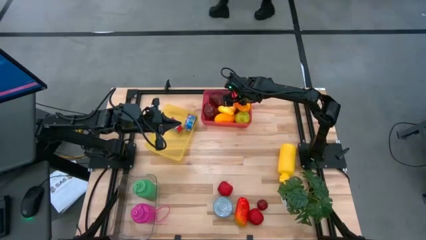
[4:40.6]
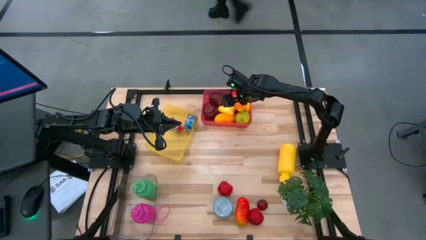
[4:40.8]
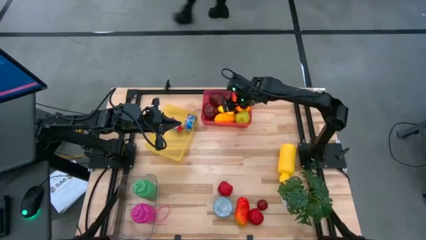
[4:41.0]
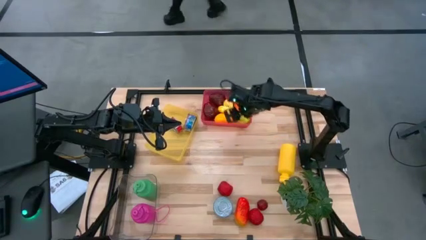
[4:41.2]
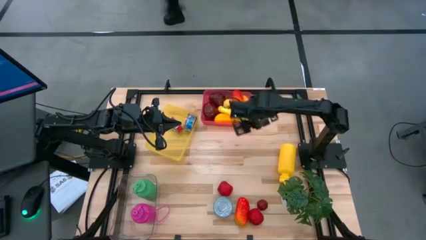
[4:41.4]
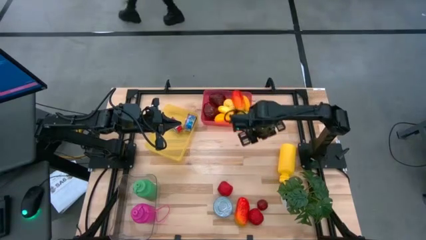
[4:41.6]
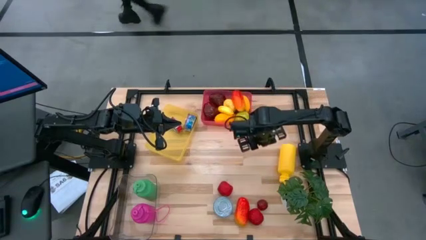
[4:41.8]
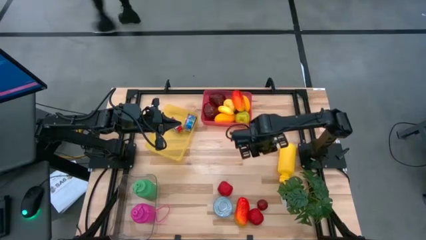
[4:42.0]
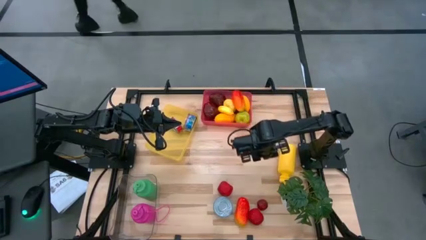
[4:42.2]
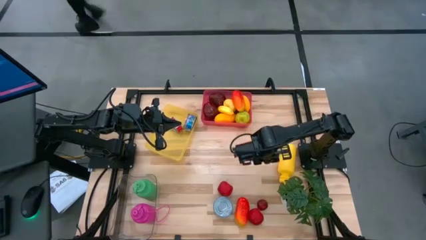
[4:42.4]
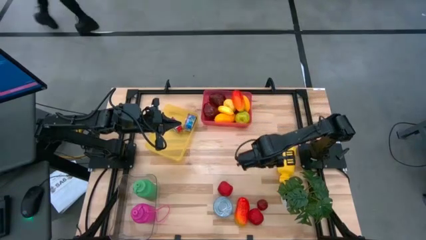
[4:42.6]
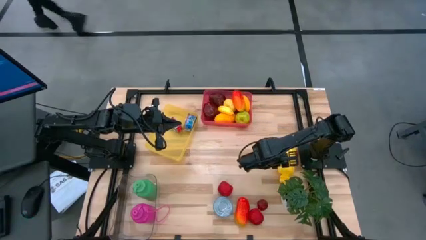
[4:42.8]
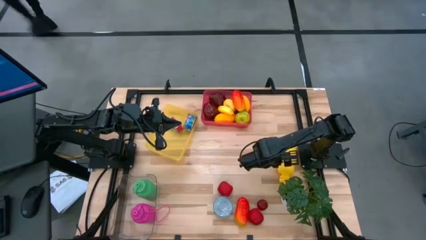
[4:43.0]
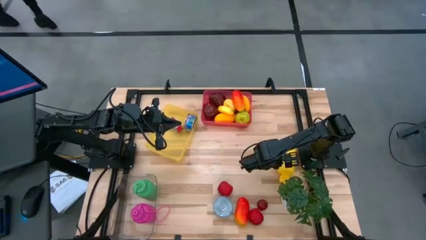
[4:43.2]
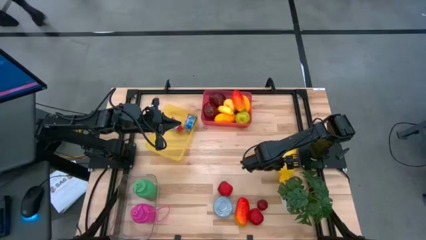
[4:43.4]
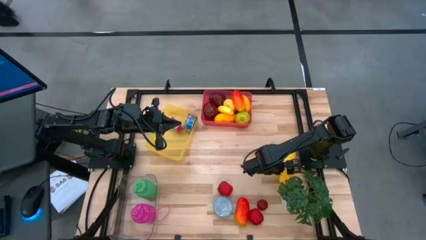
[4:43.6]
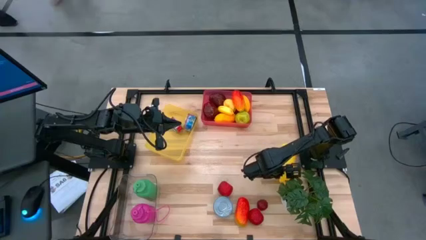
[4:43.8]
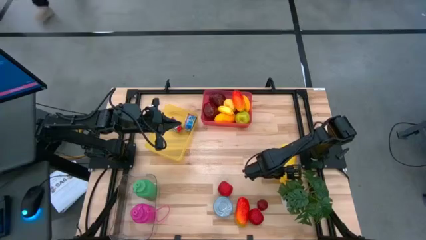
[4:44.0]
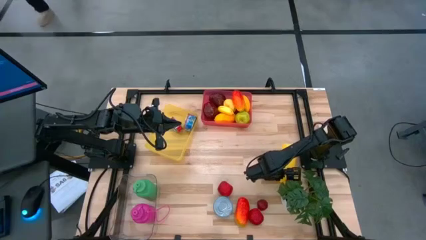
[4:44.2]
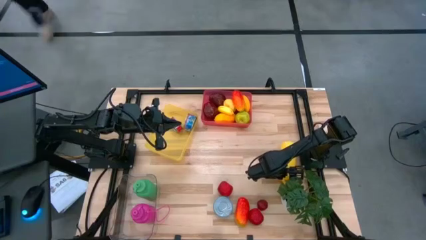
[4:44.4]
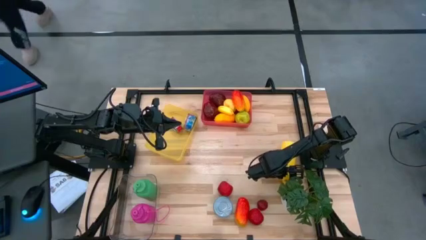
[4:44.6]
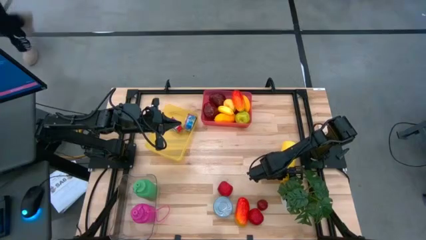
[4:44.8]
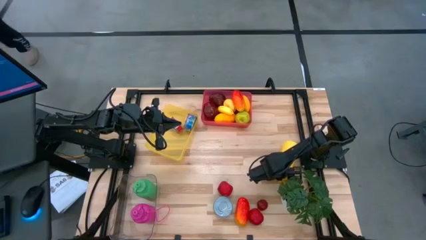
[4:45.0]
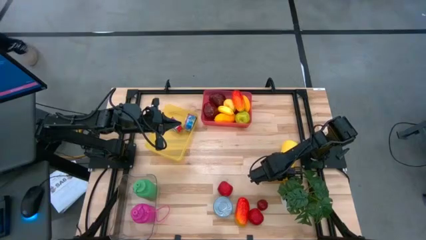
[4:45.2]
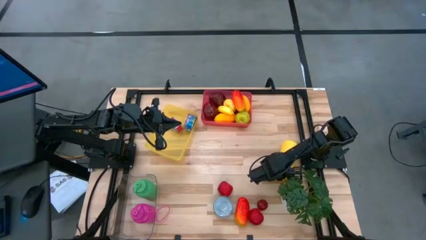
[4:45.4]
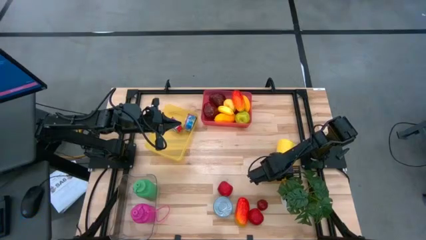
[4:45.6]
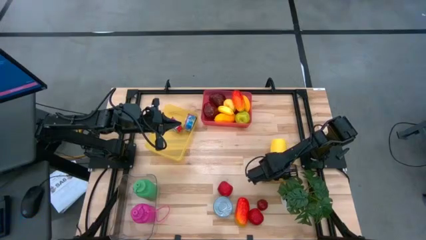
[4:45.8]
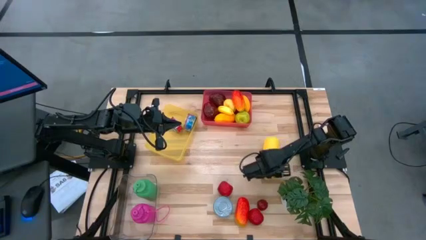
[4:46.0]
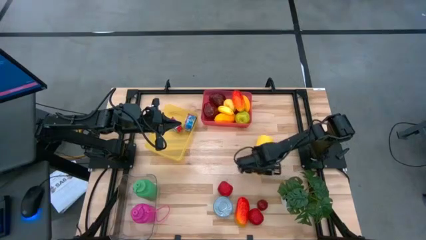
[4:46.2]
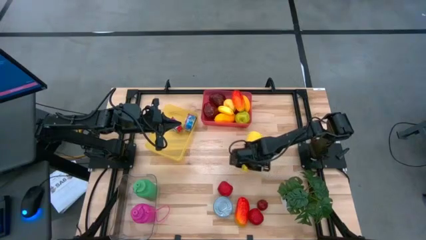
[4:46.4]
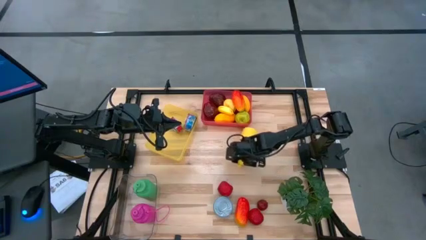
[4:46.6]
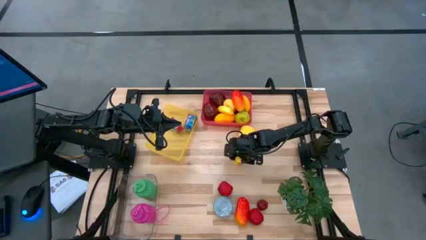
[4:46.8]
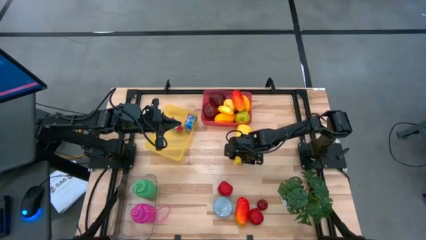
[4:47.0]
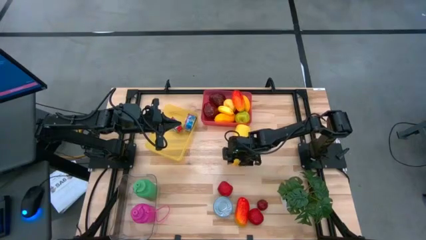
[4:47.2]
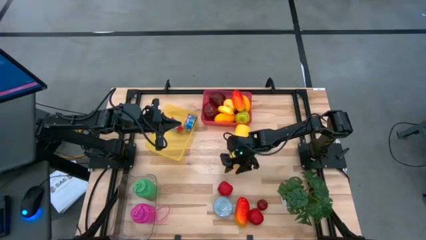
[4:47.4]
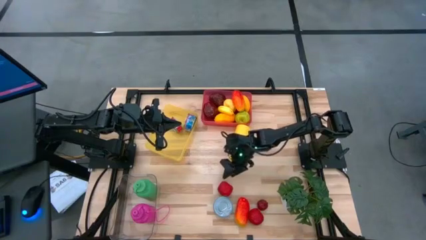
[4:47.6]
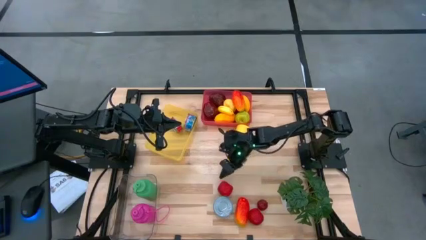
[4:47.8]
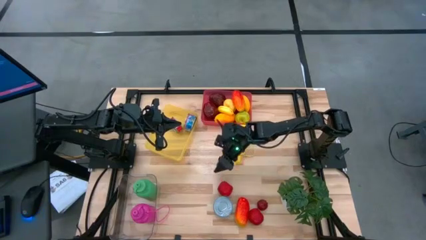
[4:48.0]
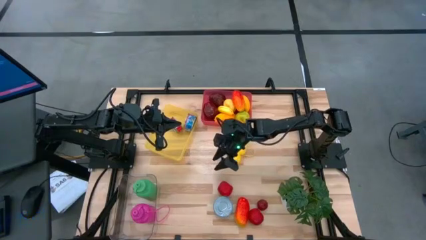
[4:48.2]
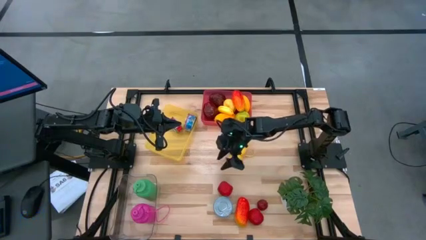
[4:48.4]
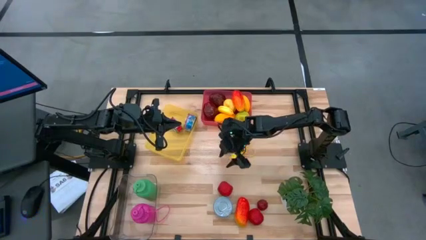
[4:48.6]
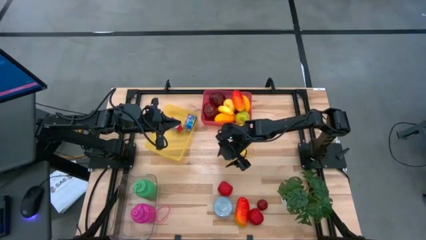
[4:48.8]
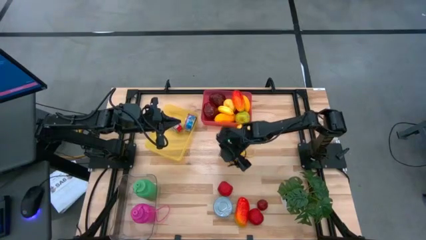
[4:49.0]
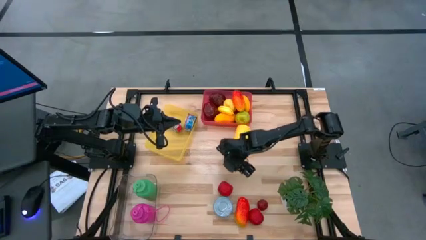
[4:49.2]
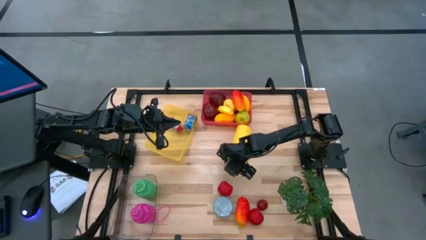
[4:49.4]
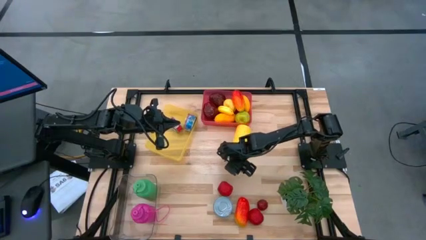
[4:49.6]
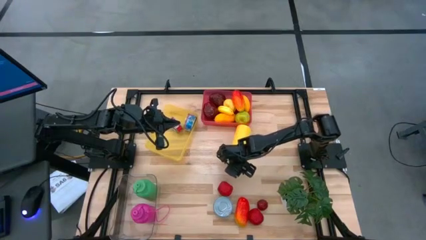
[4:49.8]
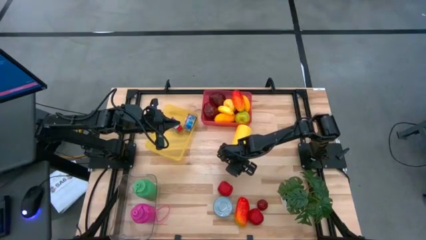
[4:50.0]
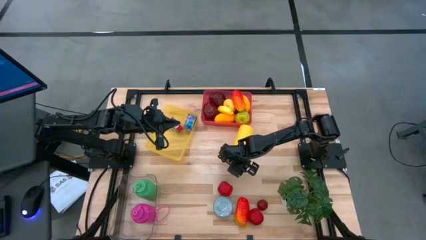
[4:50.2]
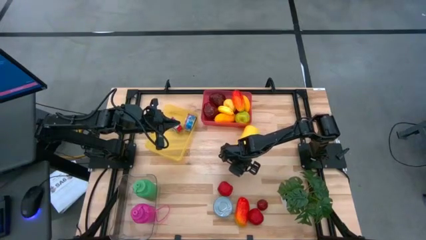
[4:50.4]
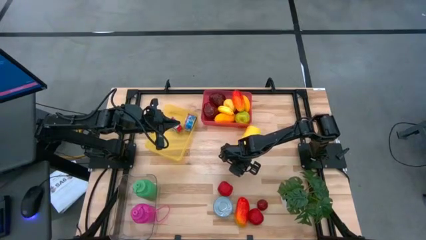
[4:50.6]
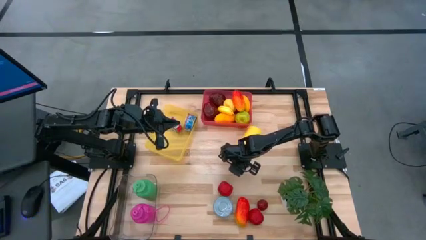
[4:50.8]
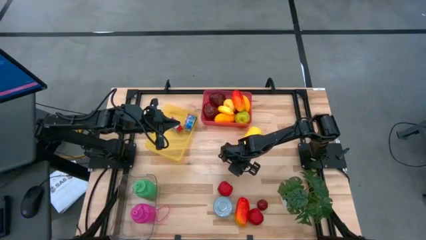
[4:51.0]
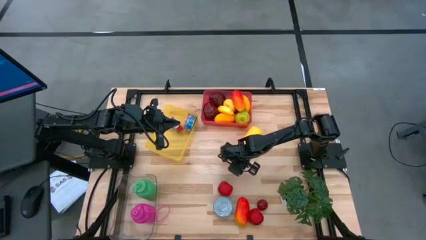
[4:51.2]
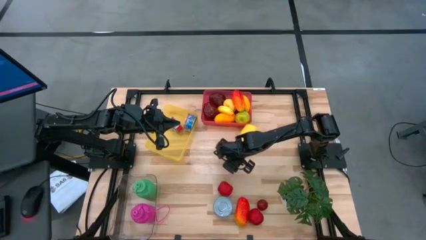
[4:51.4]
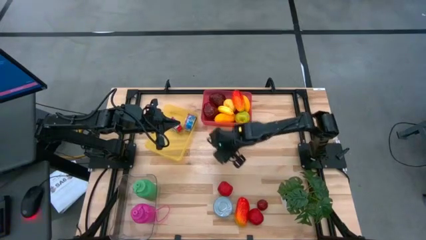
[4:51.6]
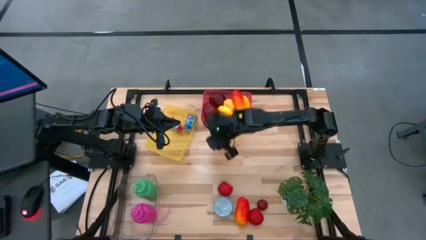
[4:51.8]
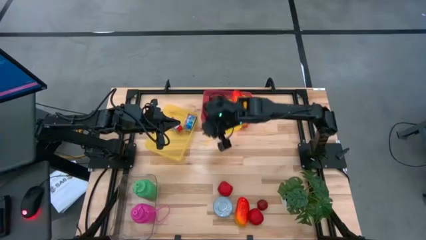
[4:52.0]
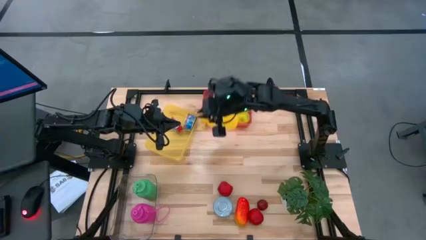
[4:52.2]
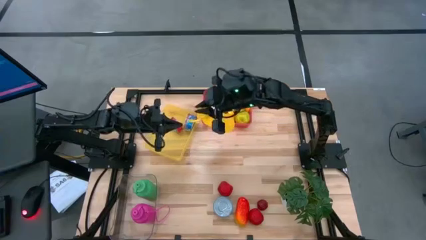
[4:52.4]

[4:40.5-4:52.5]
Task: Pick & Place Food Item
Put the yellow water bottle into the transparent bin
